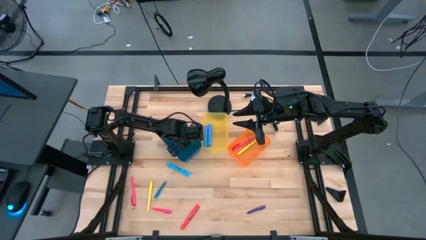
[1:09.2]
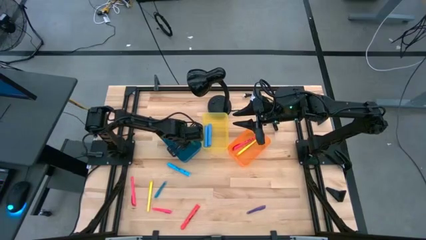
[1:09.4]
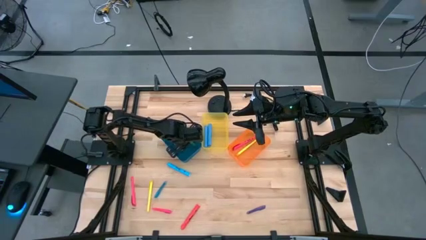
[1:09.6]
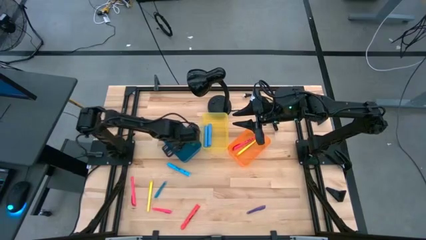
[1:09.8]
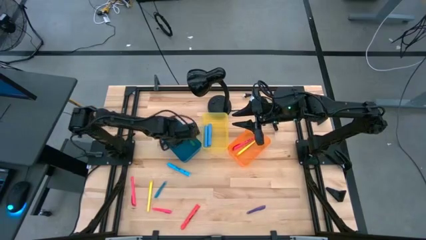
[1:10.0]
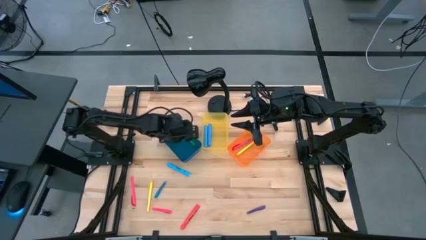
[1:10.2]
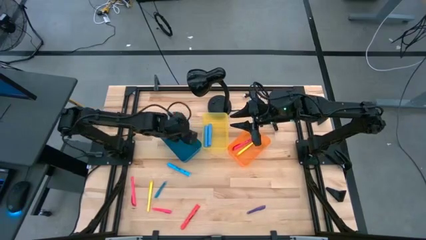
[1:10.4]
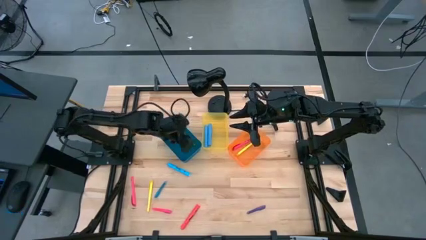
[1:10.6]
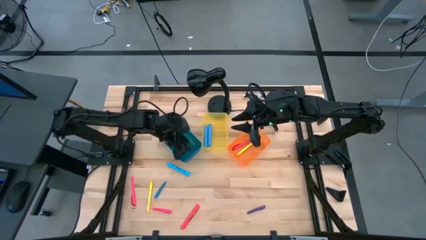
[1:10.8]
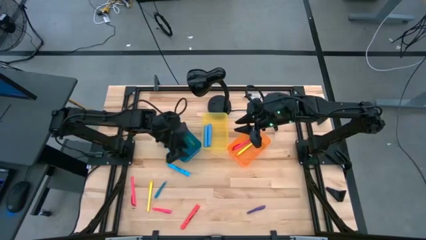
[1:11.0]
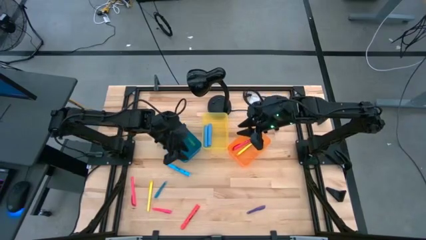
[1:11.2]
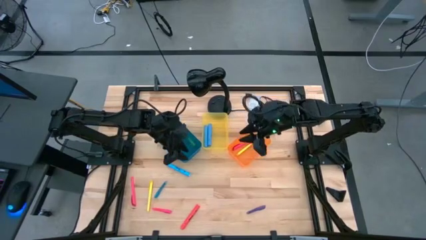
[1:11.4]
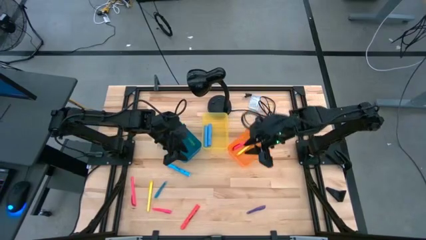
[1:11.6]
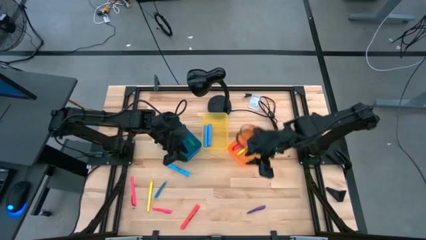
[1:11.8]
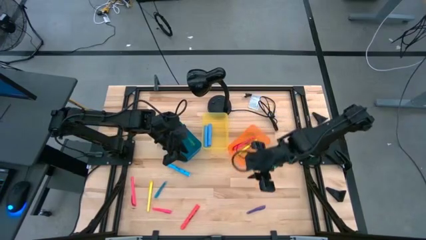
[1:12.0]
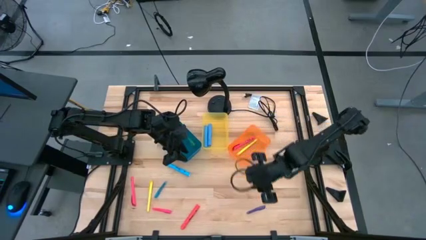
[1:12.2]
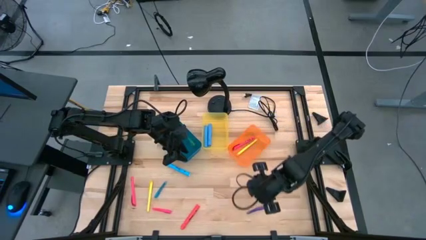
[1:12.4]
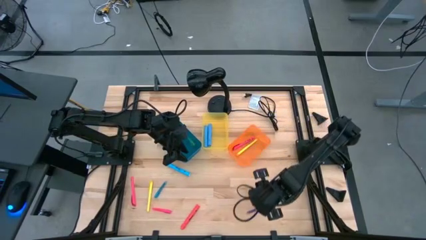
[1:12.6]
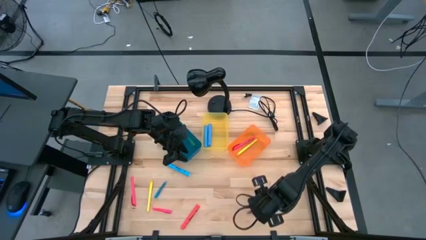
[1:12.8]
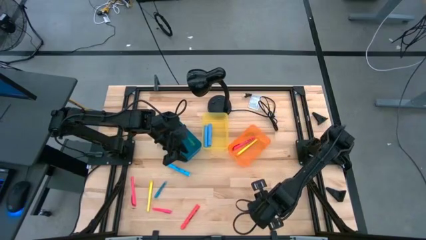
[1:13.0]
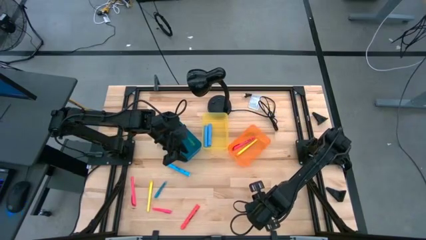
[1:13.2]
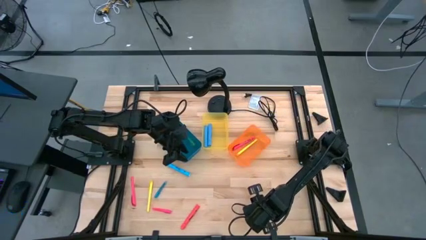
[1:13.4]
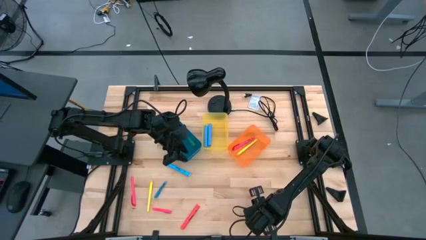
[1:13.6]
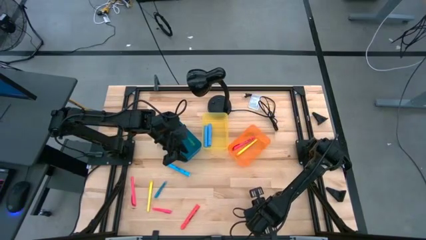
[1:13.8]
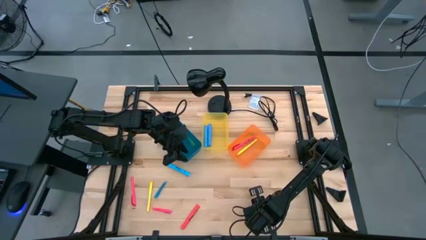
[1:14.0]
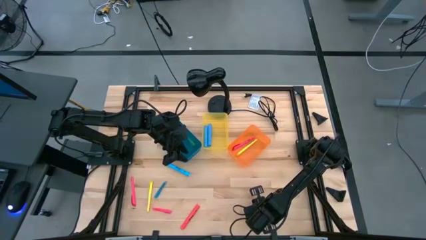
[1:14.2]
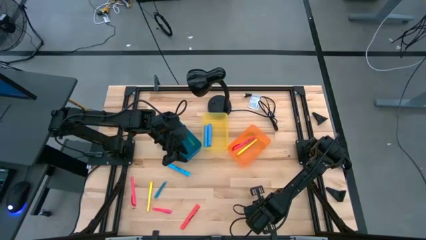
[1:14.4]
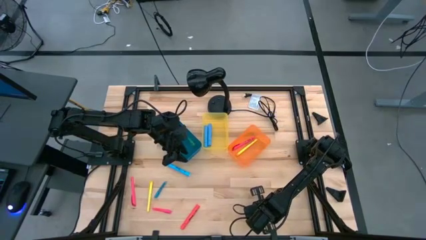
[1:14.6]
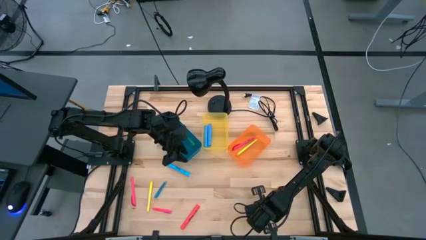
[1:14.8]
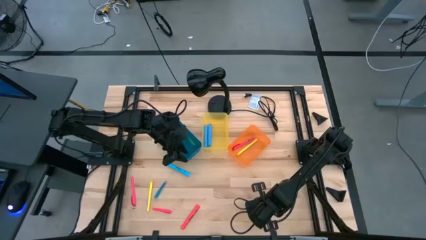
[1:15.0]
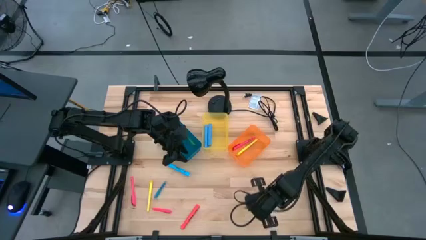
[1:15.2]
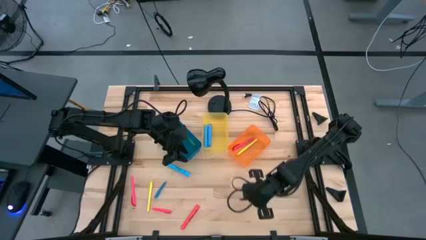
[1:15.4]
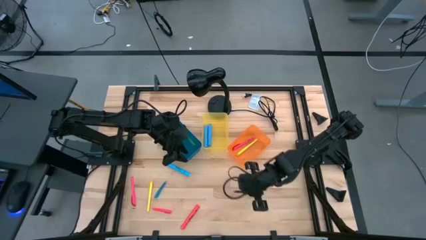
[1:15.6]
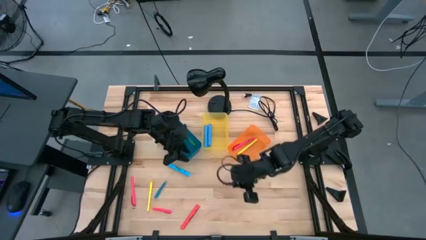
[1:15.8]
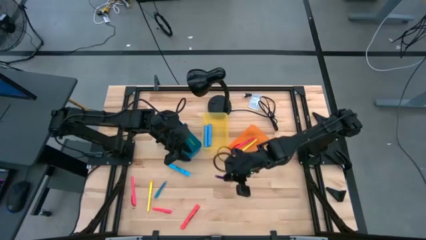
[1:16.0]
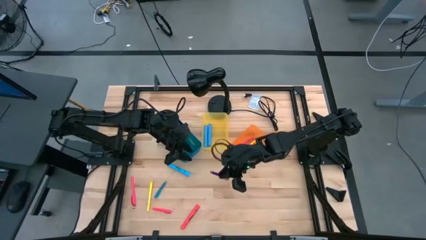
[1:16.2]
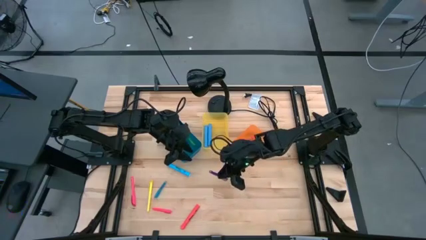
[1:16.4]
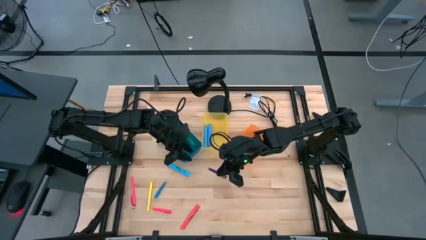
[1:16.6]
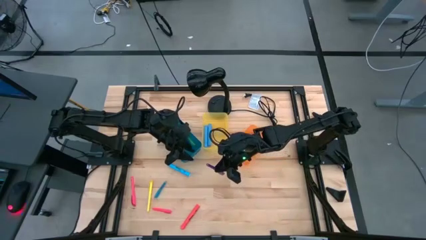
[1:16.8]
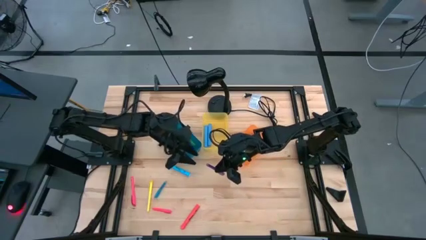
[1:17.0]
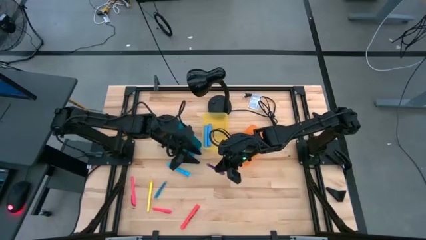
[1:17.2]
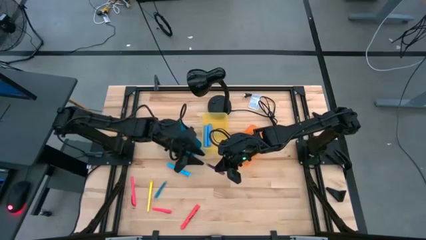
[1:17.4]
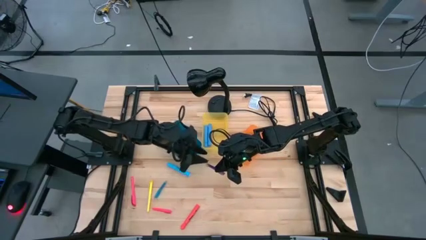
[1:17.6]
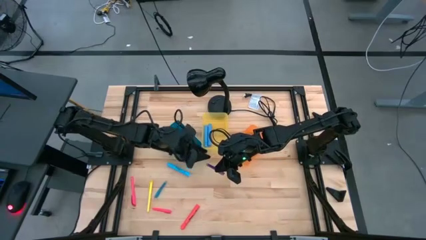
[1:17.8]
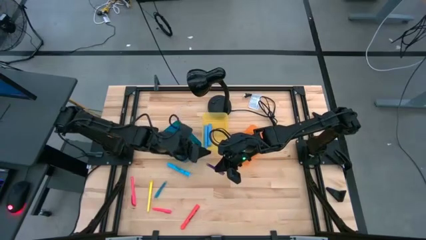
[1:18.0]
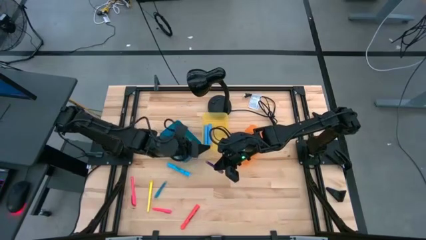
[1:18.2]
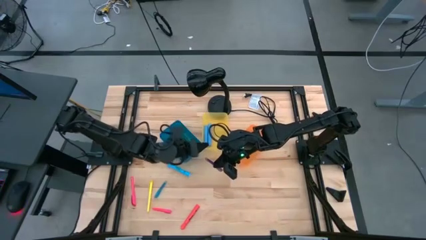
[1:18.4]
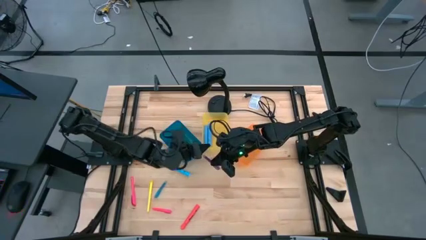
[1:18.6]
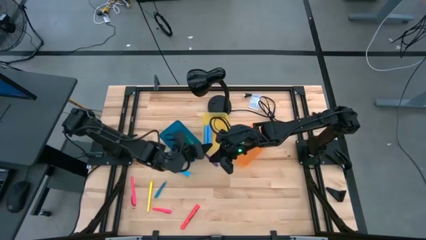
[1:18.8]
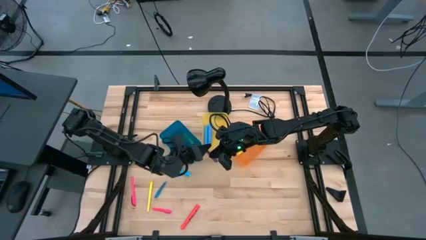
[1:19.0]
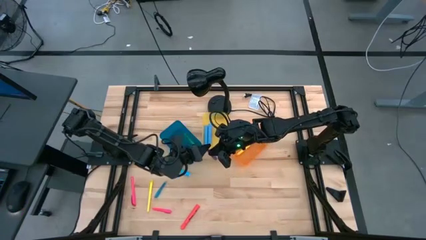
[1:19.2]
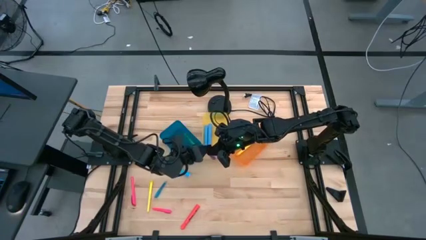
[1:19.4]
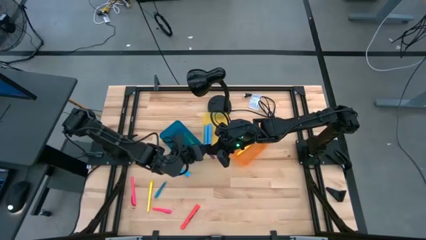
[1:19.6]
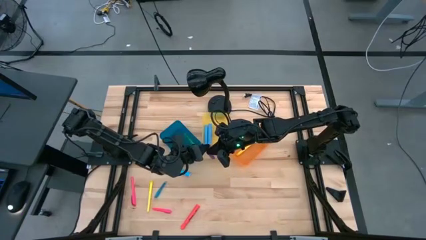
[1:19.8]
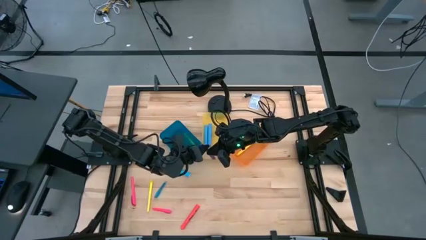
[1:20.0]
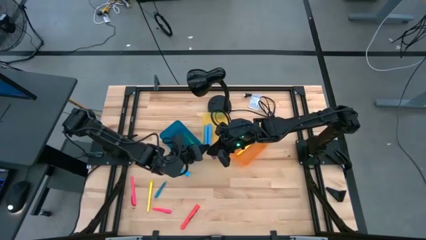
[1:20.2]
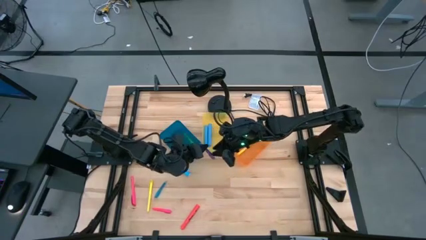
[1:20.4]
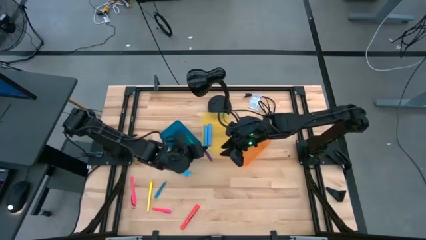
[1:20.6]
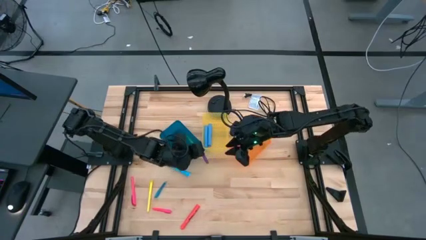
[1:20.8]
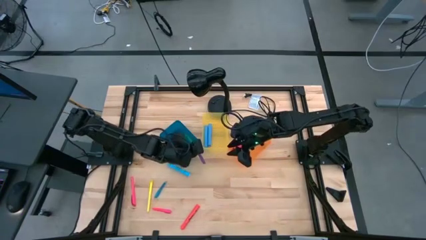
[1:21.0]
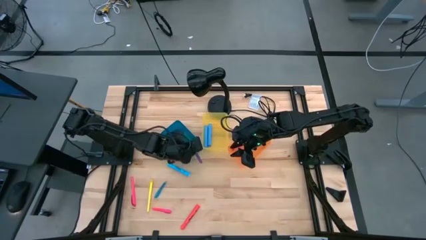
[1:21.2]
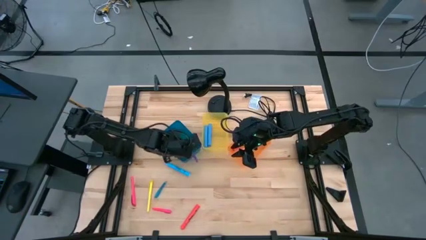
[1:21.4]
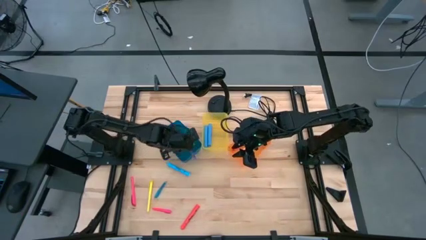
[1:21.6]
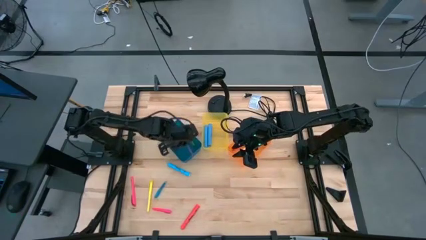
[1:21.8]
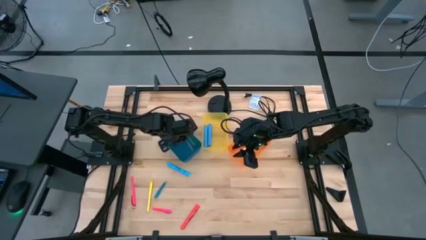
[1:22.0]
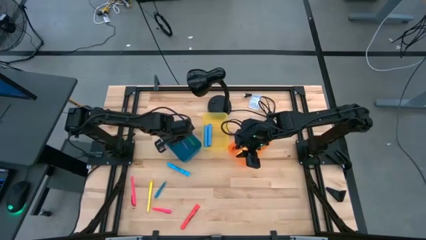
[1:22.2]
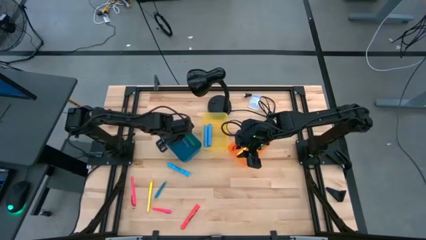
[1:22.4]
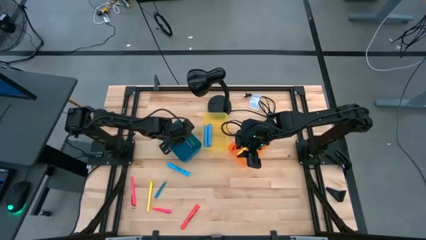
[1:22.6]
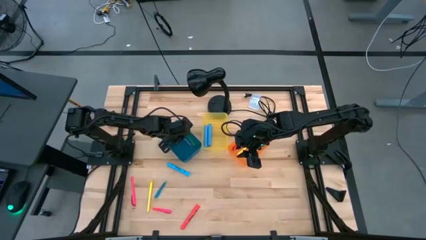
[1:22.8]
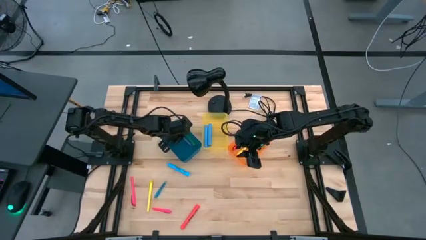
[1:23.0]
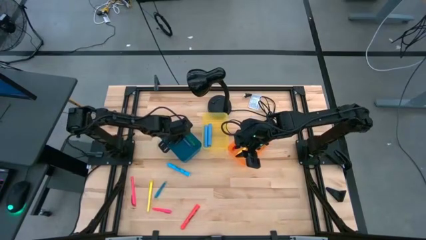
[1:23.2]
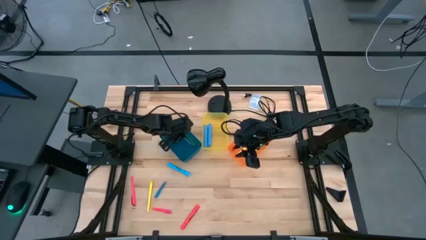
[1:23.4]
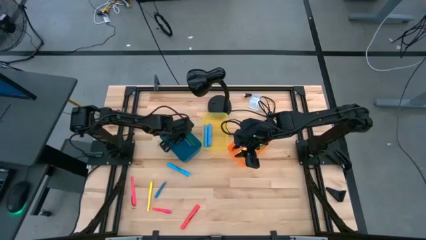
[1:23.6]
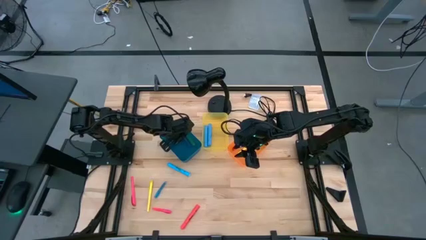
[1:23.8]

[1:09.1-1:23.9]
Task: Pick & Place Markers
Put the purple transparent pen into the blue bin
